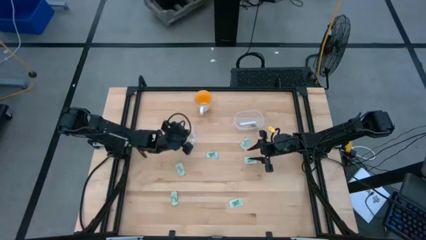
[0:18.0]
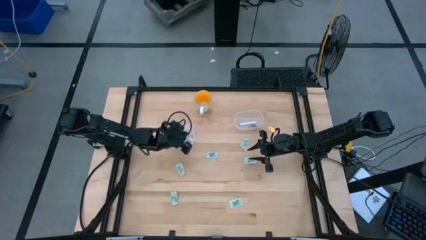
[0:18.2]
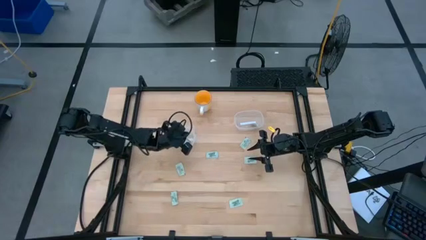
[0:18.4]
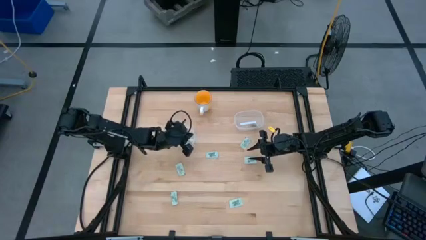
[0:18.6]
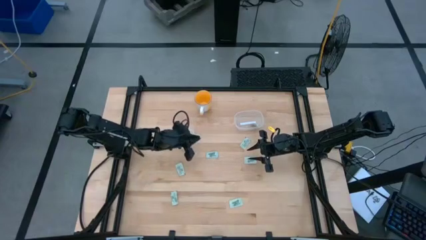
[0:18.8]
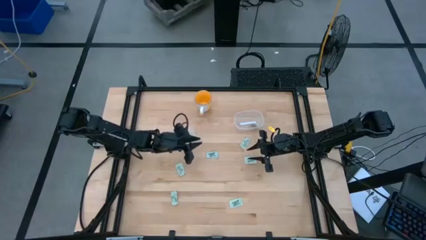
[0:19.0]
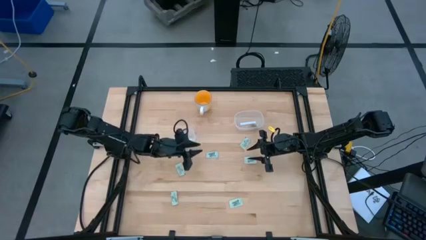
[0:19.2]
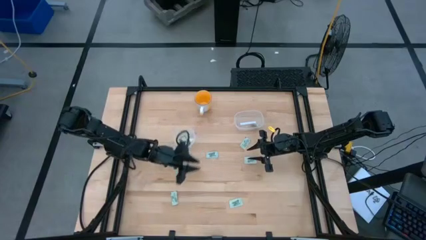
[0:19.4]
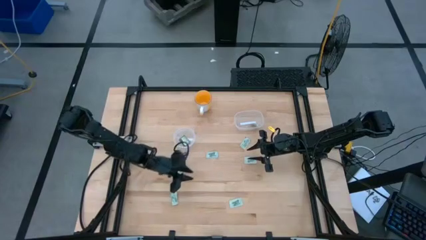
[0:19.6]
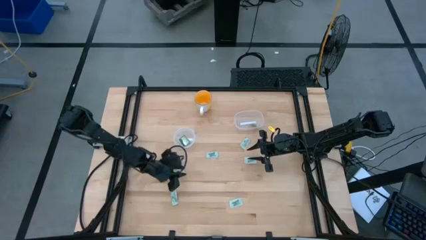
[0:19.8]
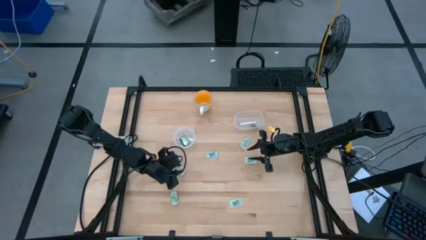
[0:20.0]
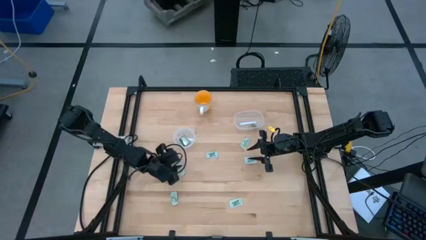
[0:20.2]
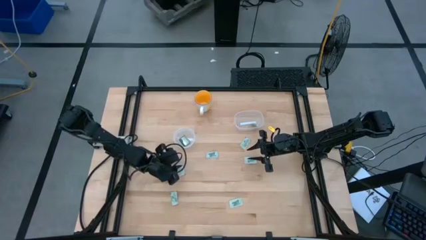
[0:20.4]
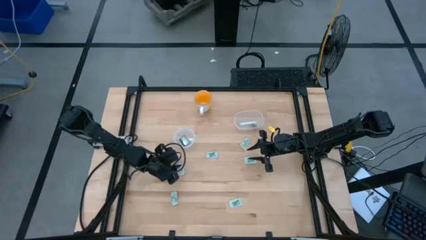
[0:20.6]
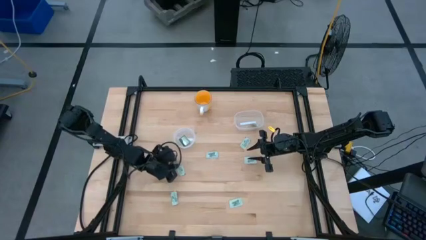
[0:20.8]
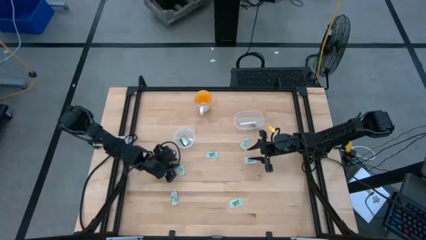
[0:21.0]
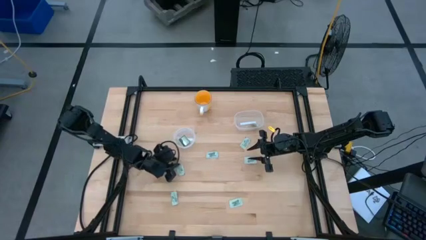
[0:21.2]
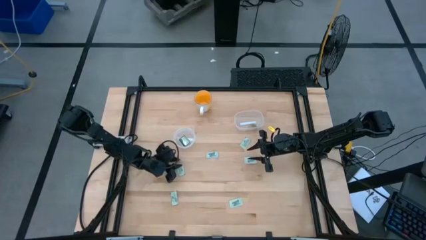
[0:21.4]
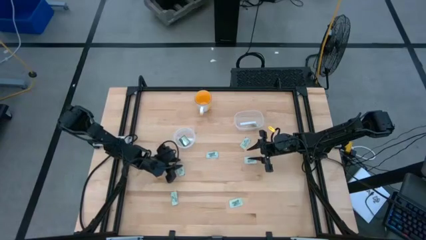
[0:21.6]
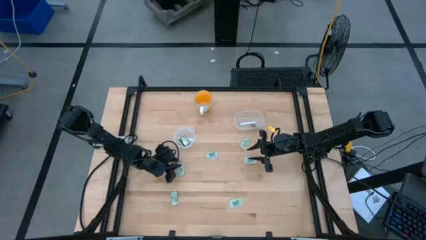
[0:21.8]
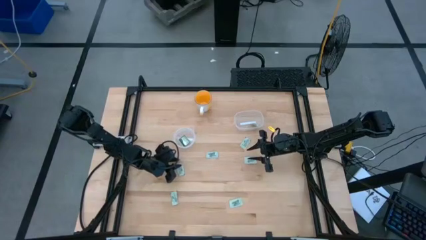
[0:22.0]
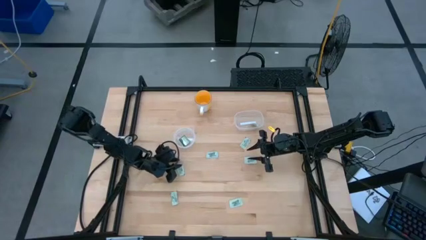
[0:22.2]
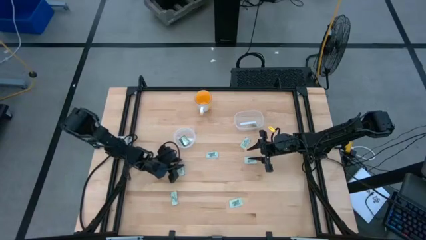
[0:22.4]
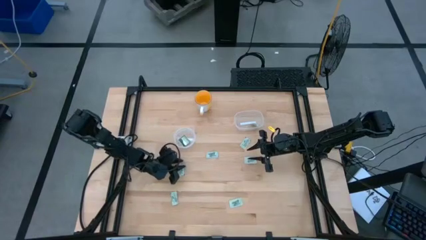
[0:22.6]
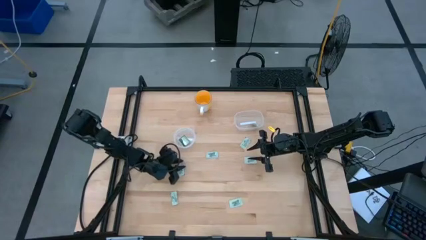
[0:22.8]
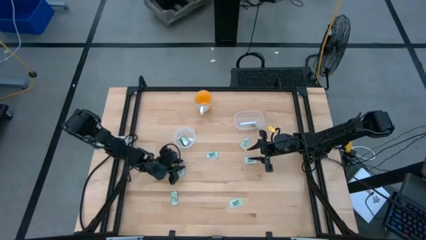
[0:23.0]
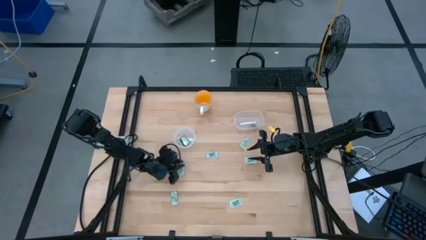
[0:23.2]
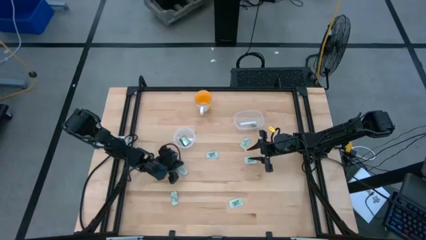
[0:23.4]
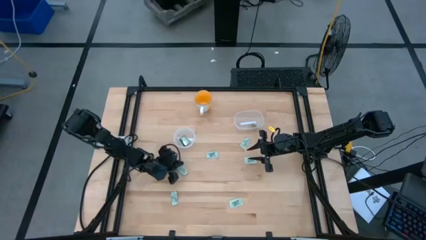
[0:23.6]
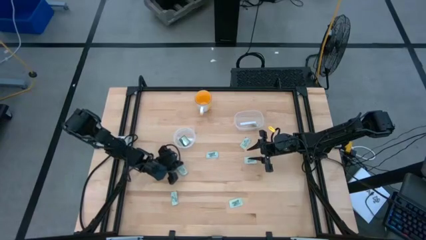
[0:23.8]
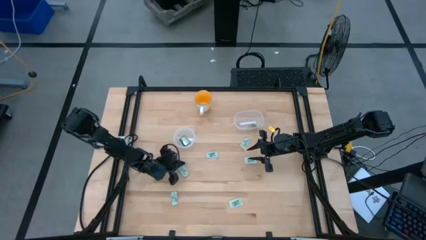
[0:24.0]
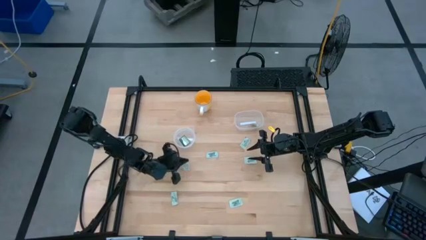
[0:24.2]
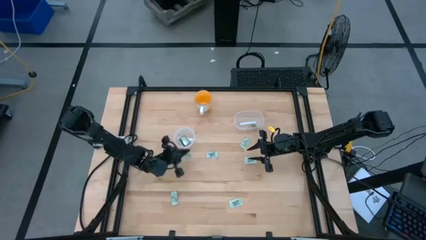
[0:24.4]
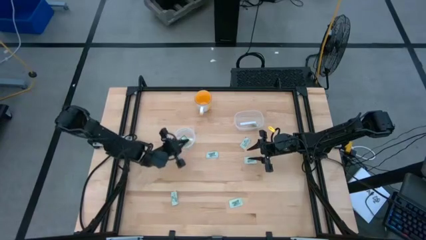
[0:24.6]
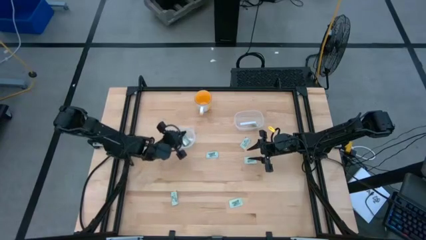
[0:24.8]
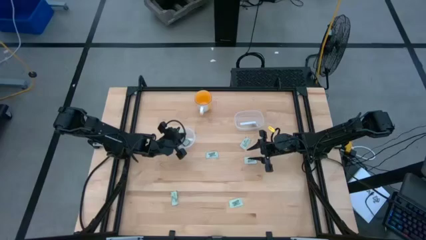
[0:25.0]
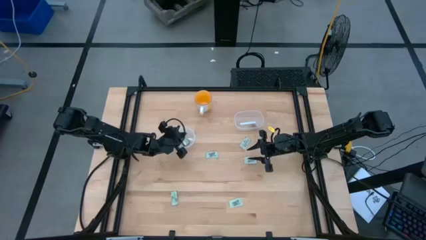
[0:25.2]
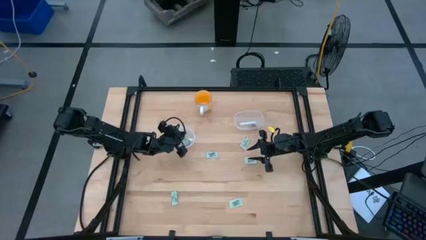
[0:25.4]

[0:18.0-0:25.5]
Task: Pick and place Stevia / Truvia into bins
Put the white stevia packet into the left transparent container

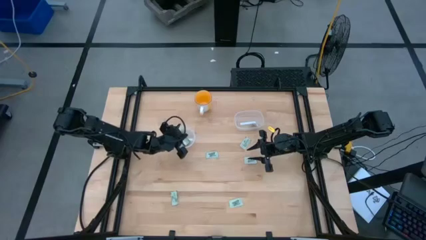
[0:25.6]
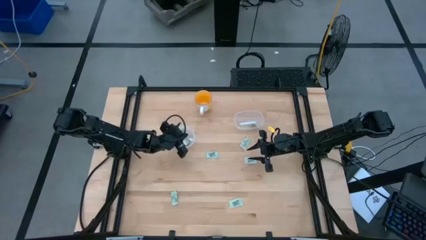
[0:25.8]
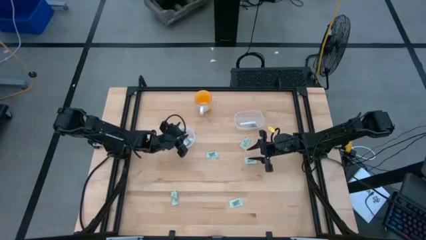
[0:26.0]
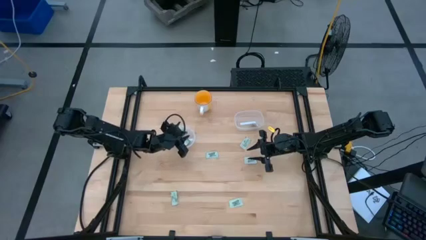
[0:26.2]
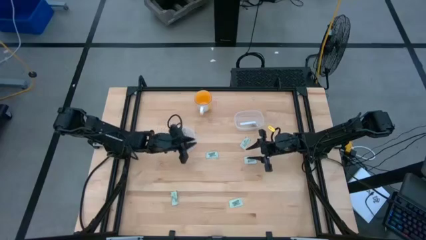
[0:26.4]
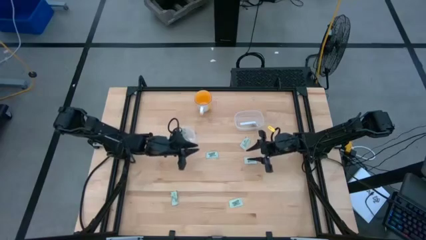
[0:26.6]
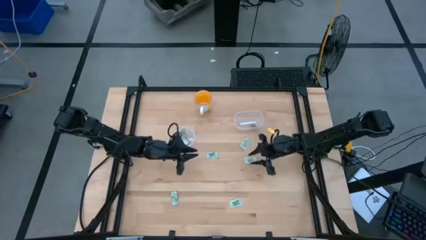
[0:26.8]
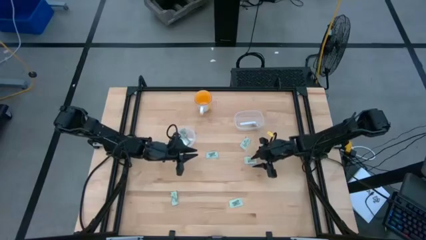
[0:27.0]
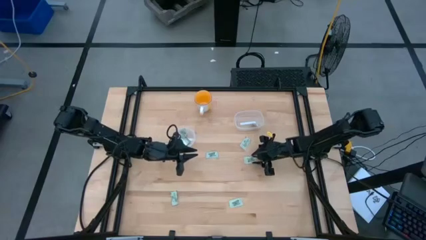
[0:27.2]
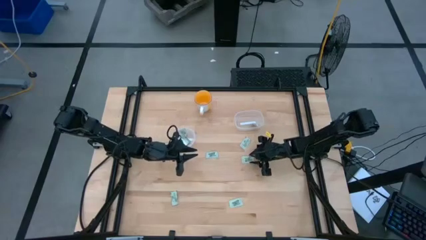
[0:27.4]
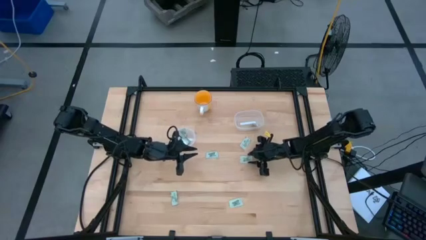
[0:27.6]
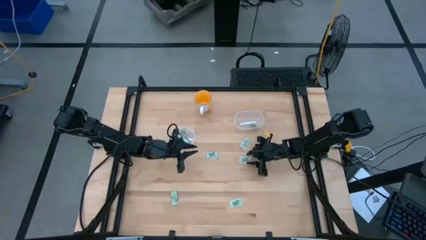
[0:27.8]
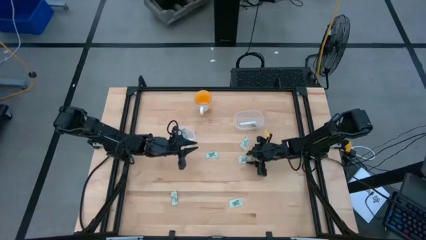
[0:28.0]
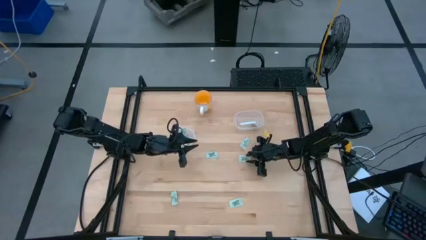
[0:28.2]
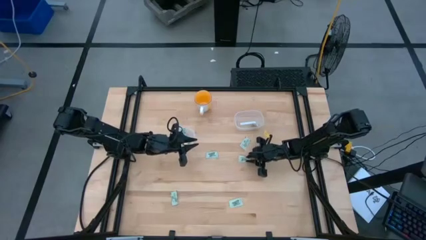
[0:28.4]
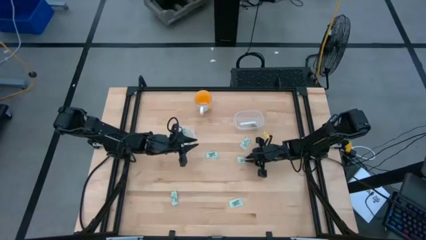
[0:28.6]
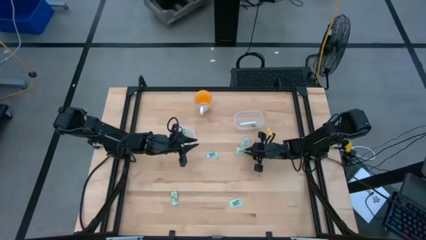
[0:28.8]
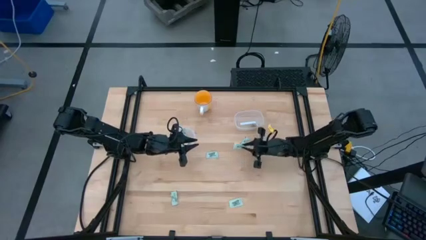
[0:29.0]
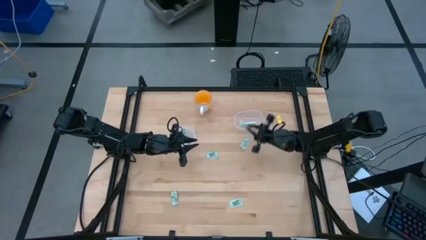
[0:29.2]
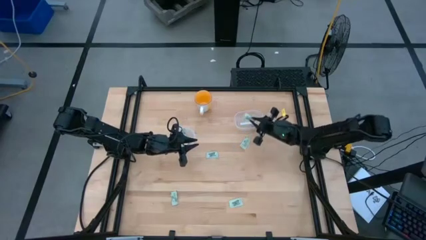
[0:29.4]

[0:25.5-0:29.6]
Put the white stevia packet into the right transparent container

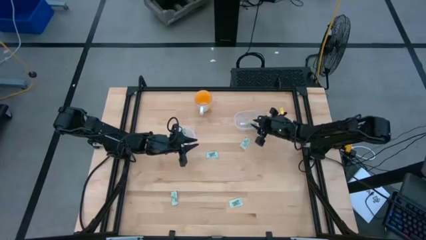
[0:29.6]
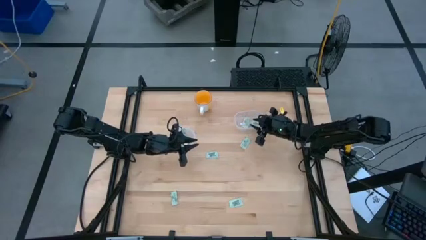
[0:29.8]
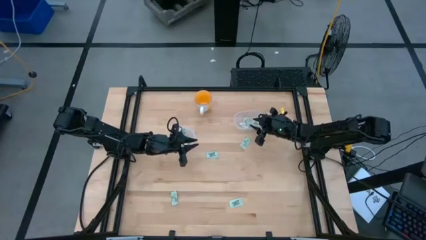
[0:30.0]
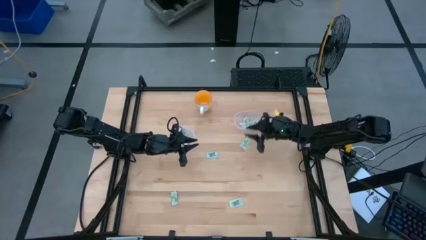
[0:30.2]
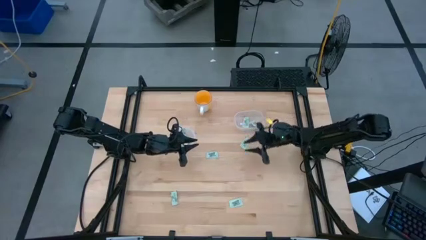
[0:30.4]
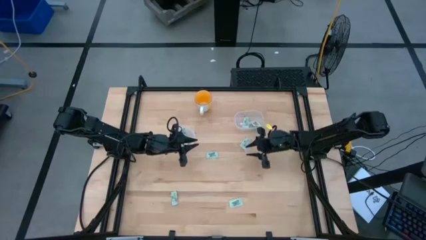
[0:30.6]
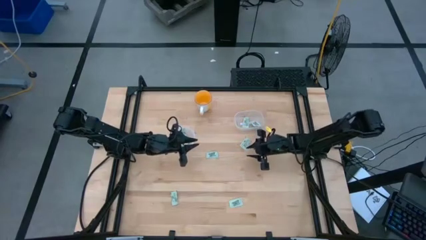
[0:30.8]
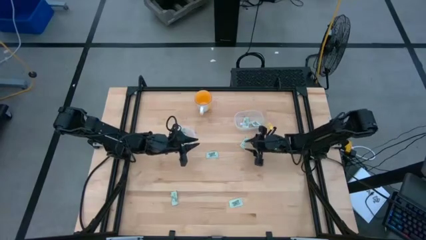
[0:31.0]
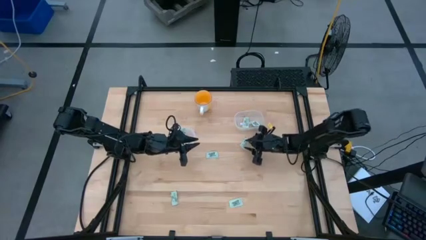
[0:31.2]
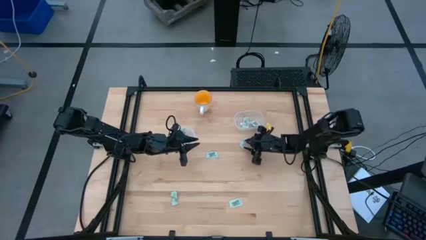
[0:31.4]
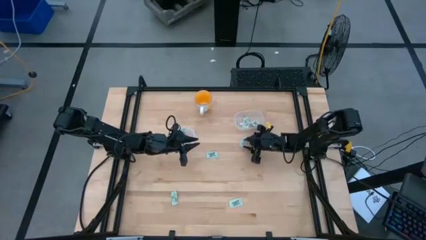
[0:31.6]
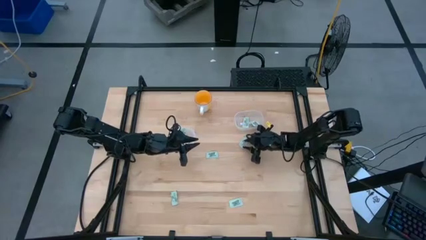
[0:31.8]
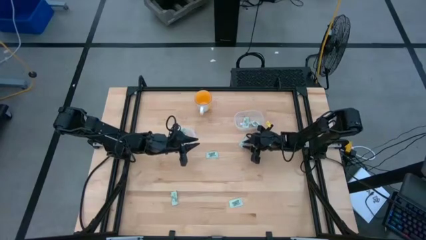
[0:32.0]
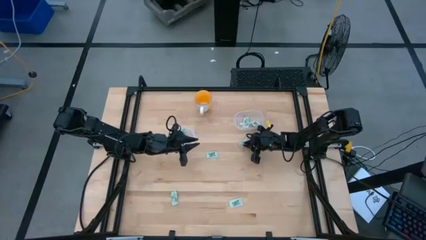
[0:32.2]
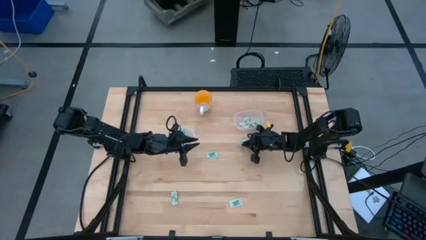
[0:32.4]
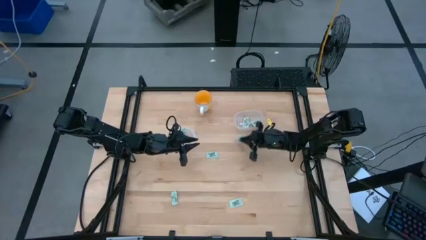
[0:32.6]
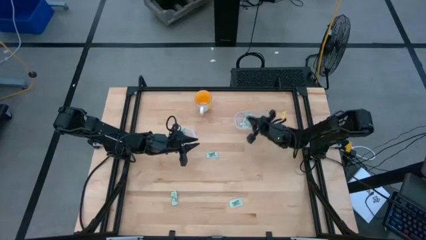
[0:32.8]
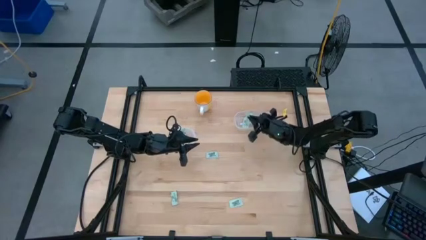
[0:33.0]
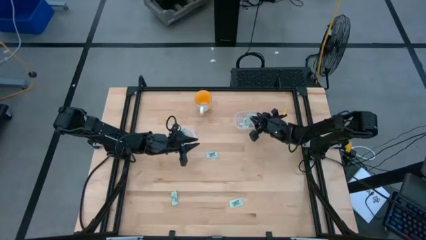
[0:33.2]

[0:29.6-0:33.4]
Put the white stevia packet into the right transparent container

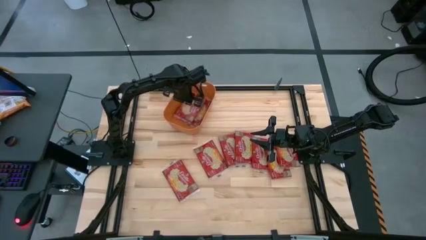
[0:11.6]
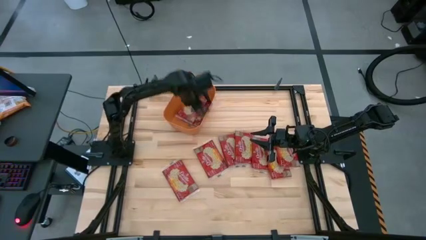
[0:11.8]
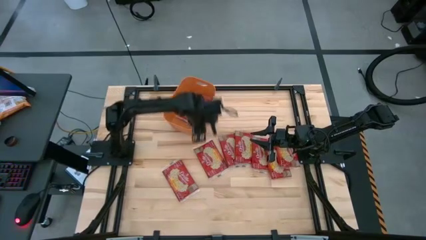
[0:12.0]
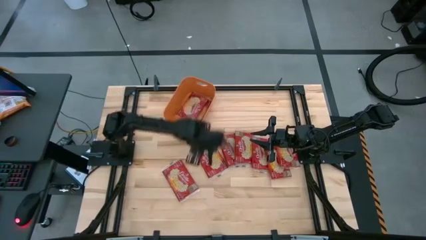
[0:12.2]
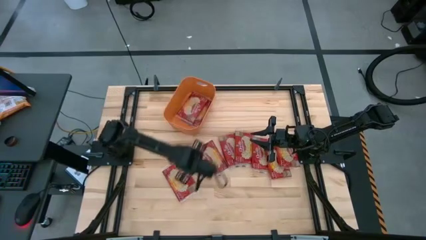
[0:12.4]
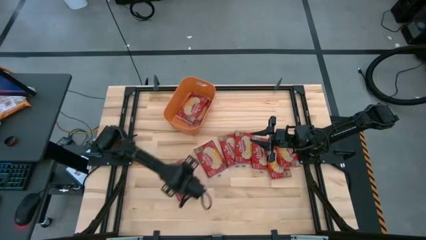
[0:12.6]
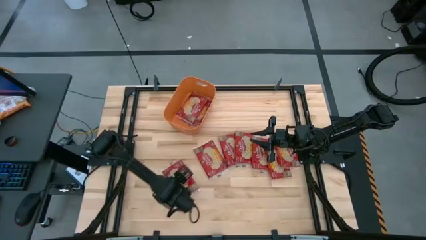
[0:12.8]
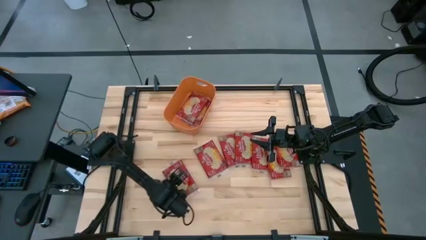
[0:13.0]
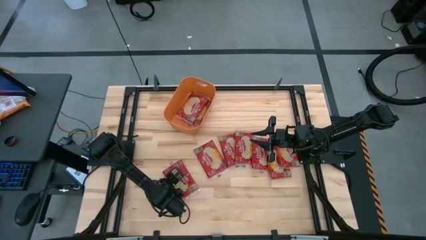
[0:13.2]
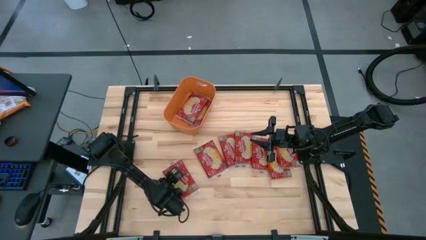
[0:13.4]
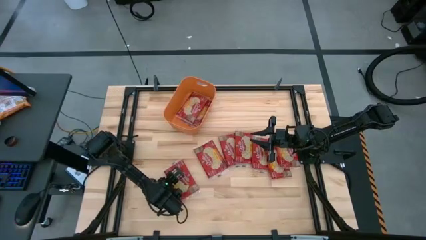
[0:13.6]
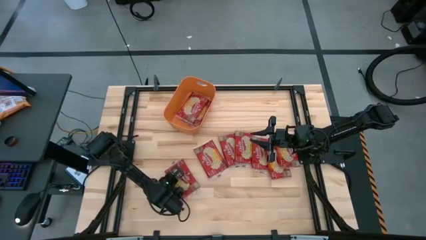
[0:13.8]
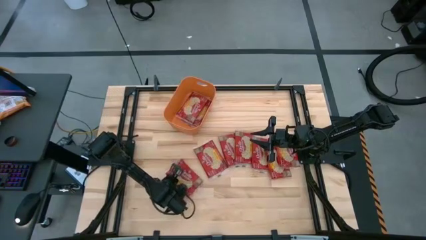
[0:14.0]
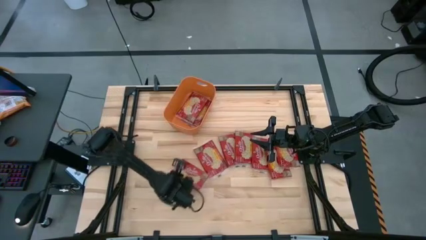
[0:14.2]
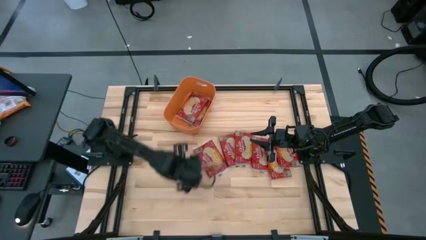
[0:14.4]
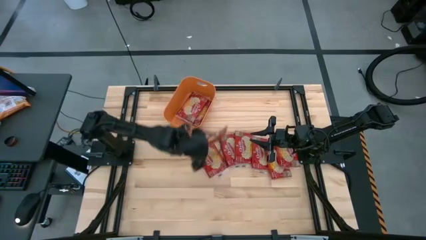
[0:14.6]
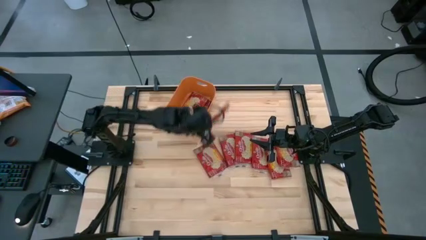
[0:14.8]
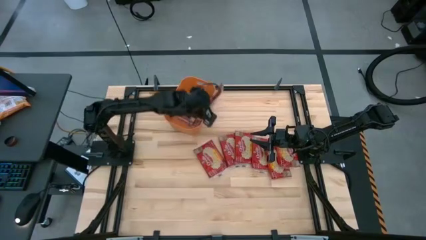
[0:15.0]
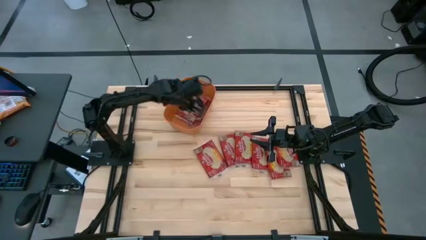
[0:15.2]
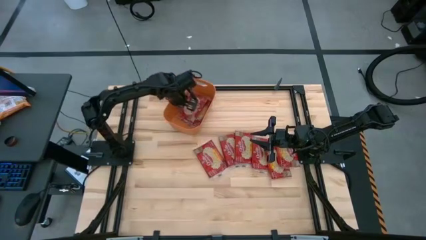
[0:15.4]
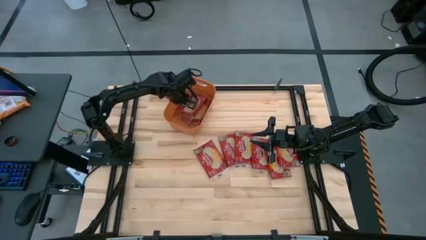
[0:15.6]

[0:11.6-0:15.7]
Task: Sort popcorn bags into baskets
Put the red popcorn bag into the orange bin
